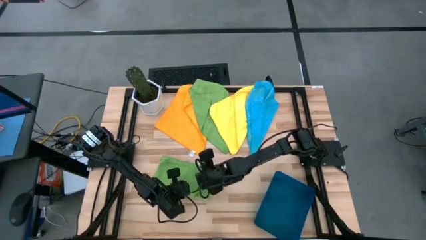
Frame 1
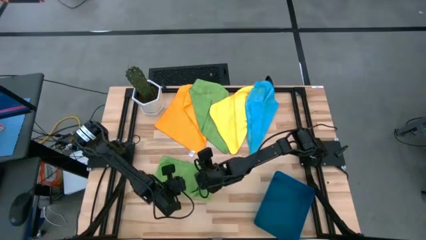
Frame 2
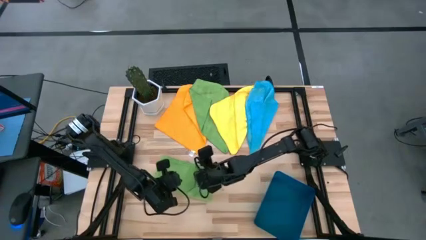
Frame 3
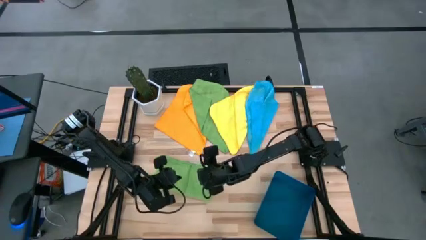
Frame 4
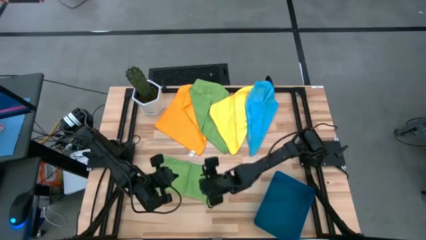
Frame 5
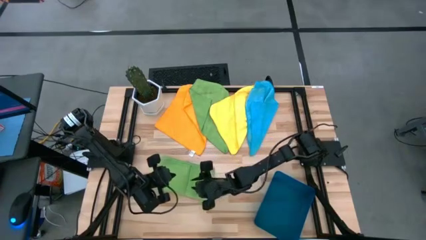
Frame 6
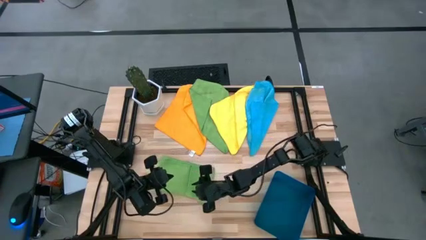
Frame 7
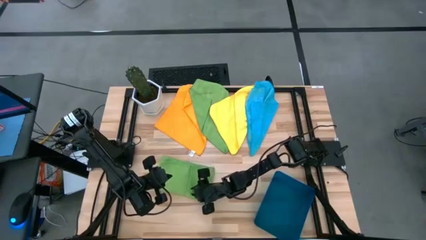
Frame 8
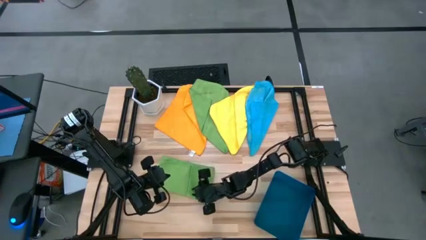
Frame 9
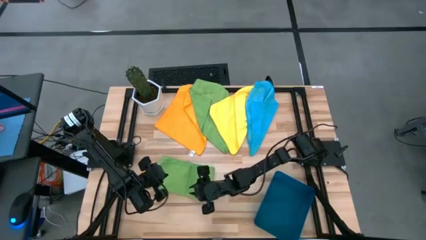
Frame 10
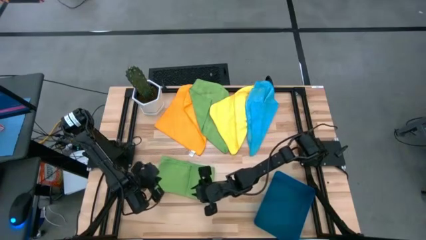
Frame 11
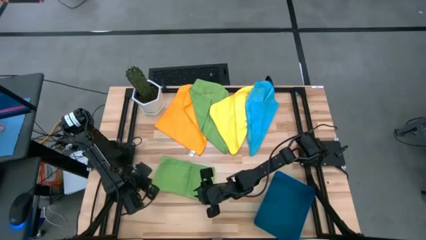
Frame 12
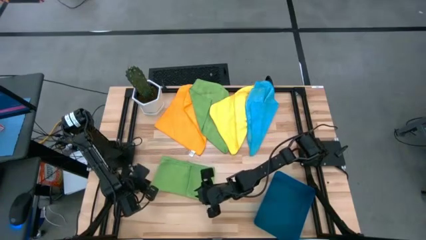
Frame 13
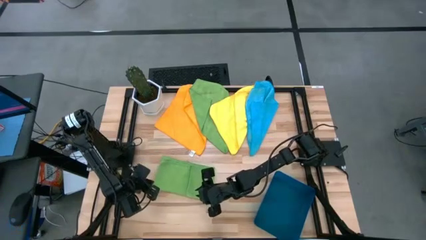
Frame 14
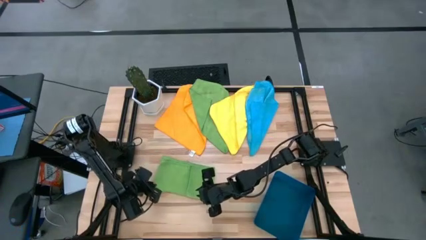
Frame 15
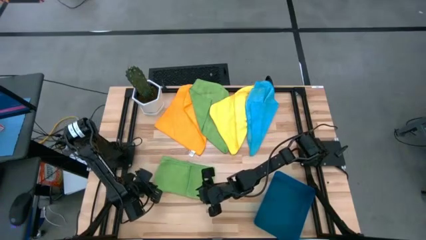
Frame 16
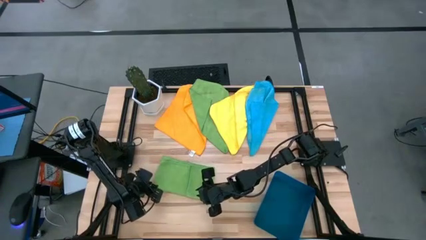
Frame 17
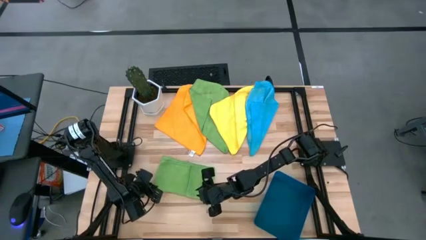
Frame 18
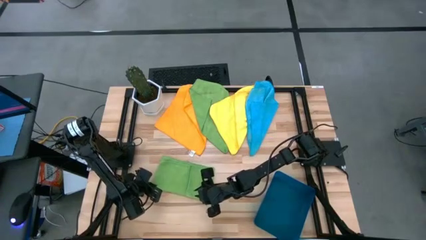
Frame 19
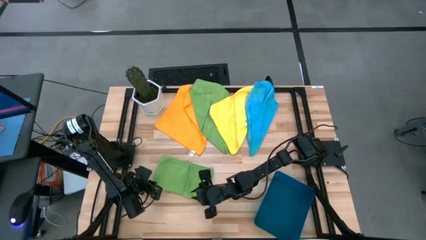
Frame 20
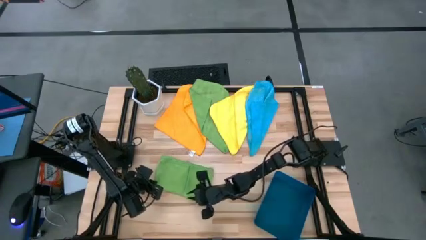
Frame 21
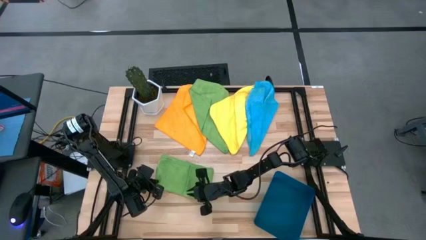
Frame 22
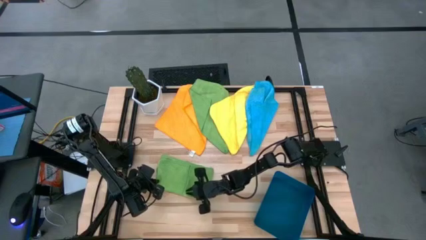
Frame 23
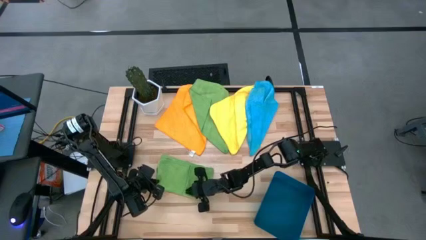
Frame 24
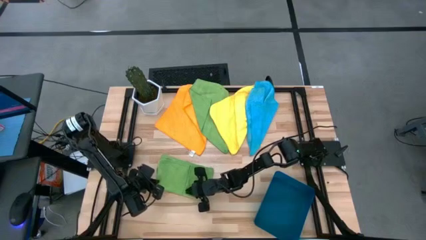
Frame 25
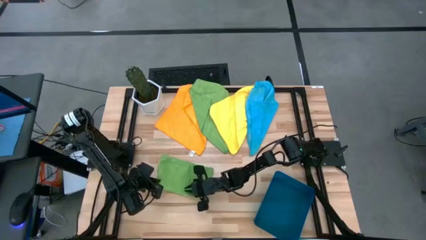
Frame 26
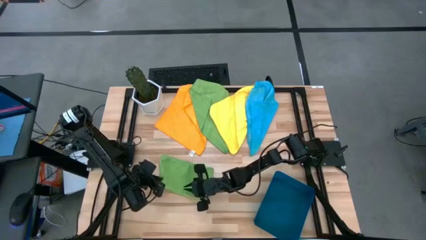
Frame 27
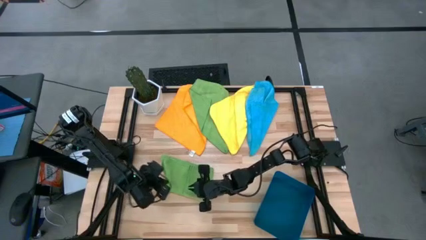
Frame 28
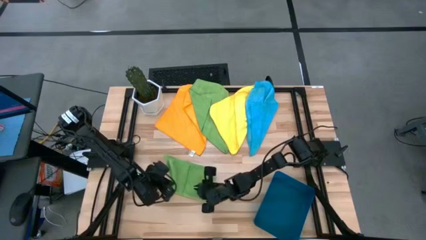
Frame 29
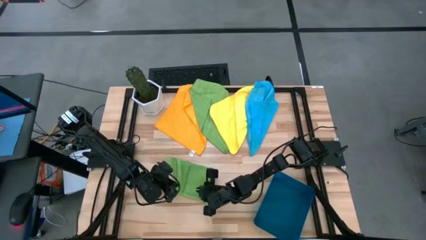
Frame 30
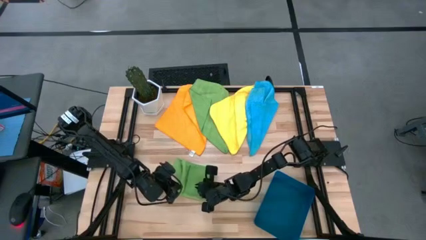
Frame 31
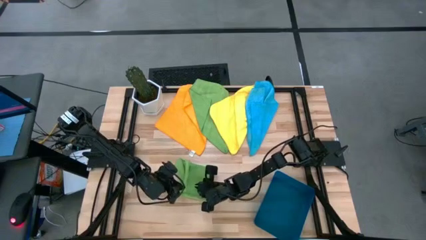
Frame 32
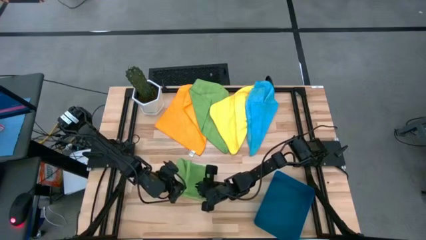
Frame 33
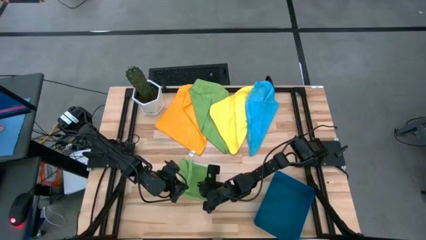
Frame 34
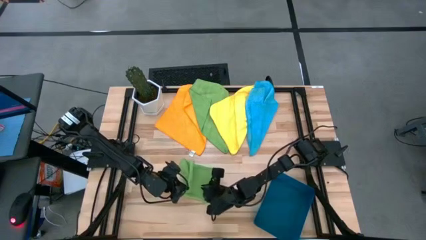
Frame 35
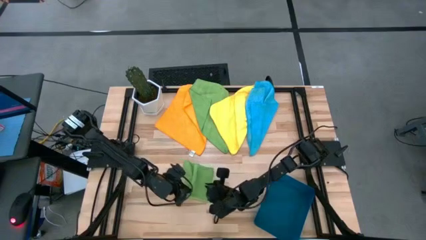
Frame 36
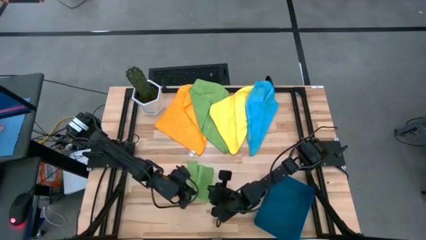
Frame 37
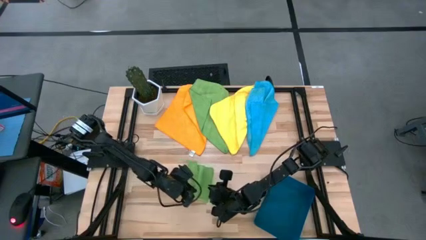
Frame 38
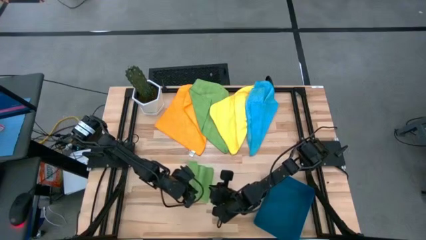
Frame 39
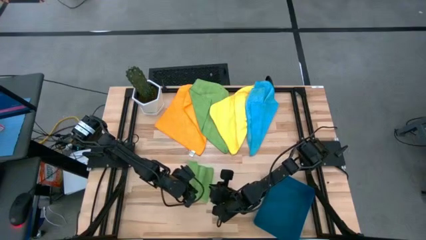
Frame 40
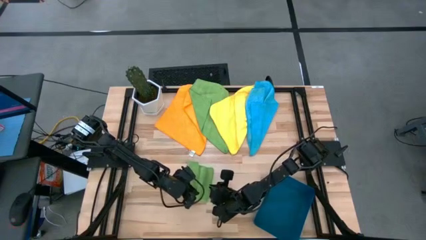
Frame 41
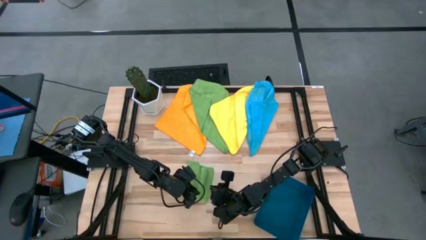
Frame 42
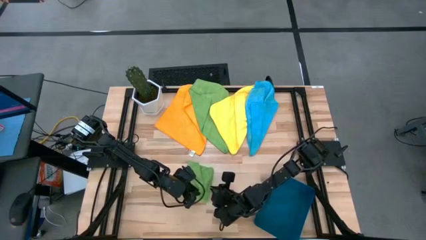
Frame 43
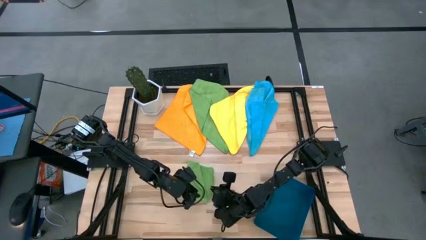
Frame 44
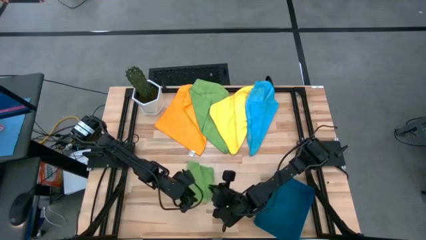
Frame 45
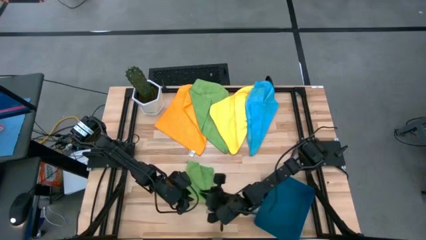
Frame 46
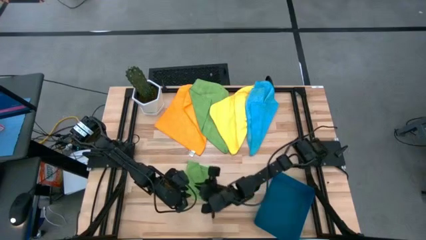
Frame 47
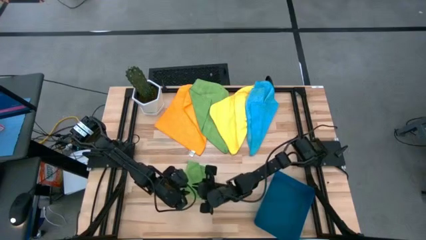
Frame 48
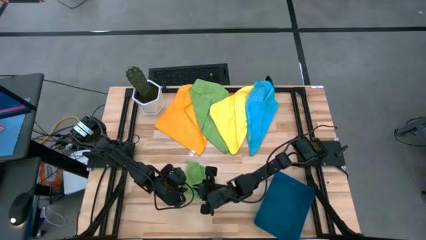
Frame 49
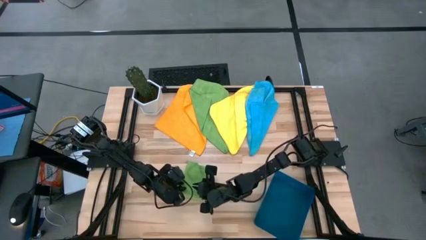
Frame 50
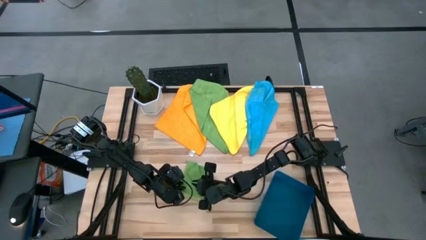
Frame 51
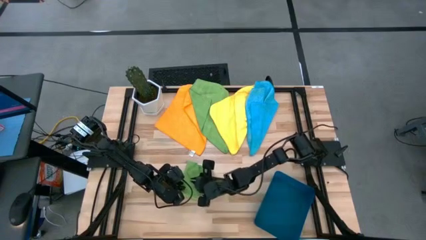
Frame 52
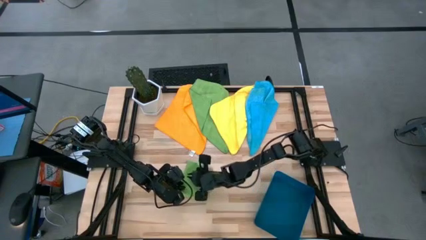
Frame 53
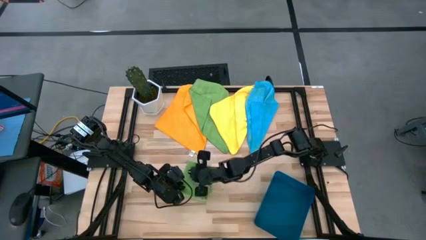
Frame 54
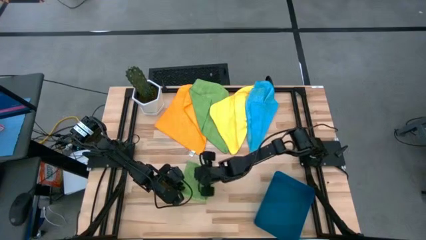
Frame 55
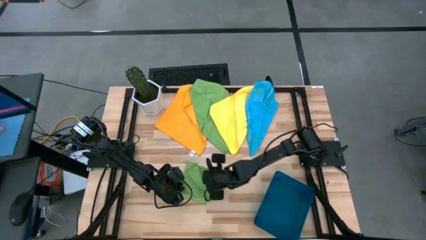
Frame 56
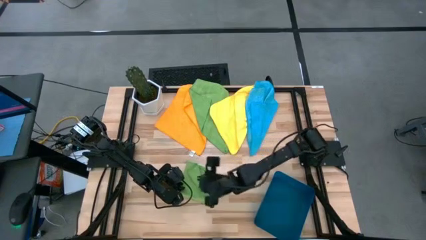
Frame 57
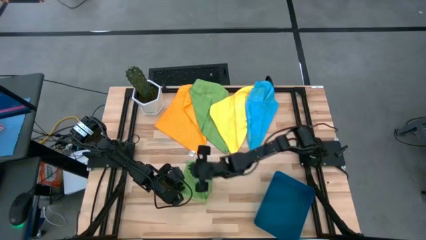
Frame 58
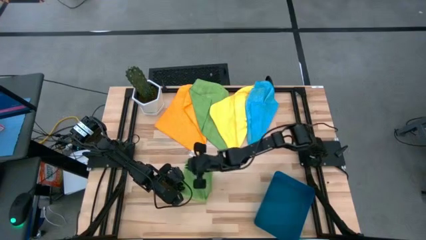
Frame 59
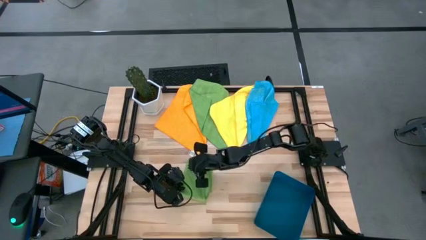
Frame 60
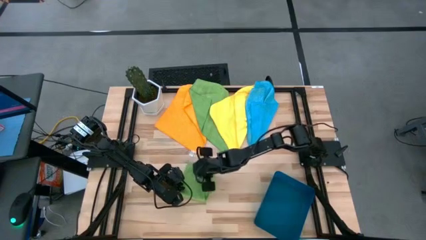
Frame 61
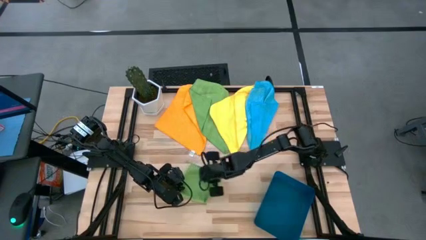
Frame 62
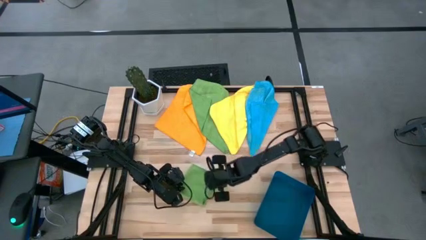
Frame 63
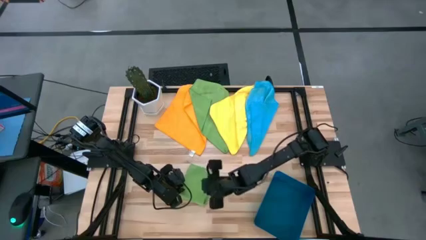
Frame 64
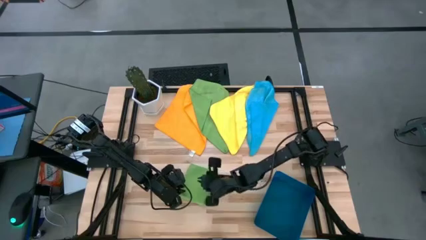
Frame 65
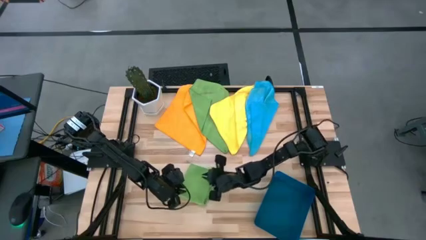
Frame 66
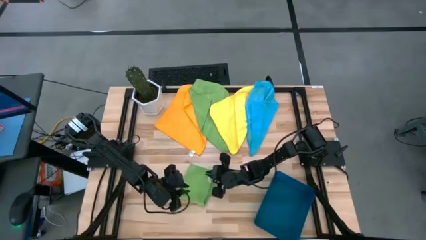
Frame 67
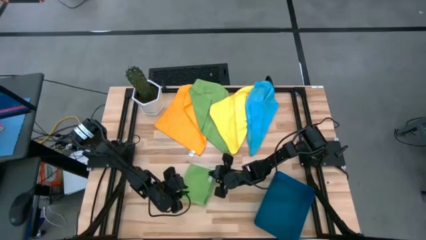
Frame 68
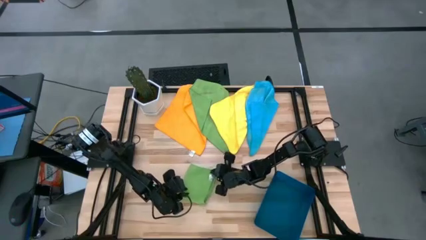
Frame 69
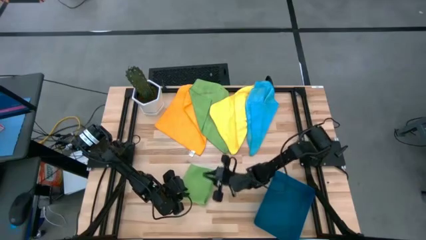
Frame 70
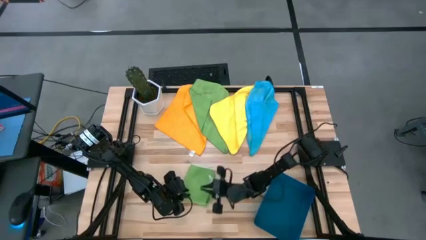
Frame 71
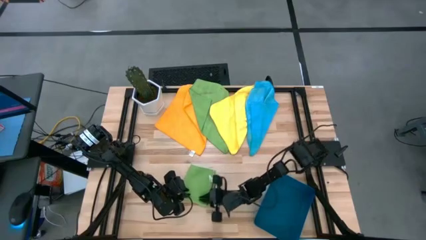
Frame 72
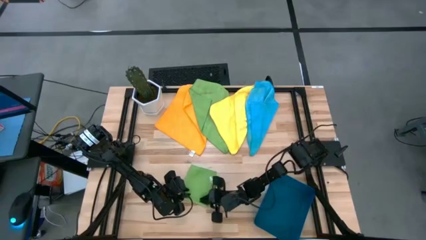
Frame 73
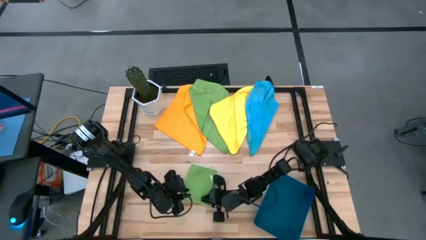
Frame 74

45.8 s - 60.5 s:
Task: Fold microfiber towels
Fold the right green microfiber towel
